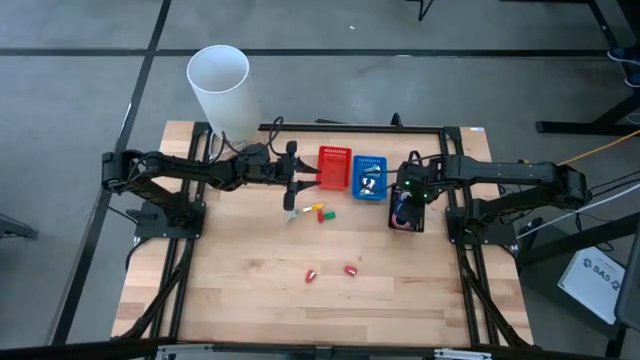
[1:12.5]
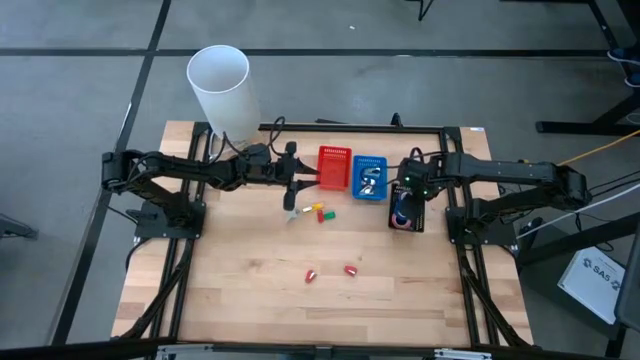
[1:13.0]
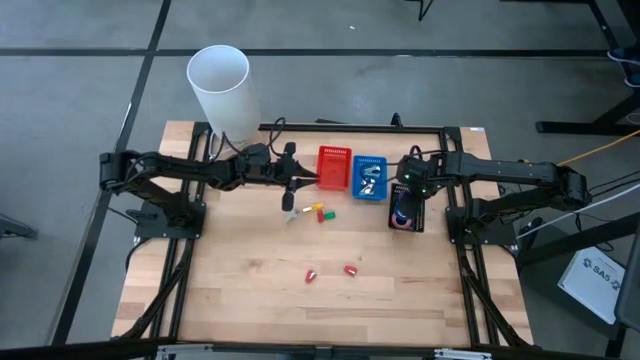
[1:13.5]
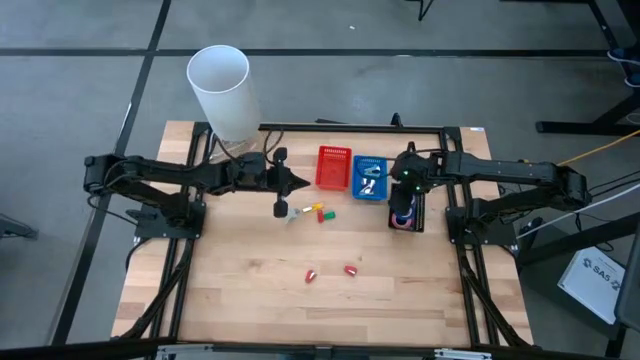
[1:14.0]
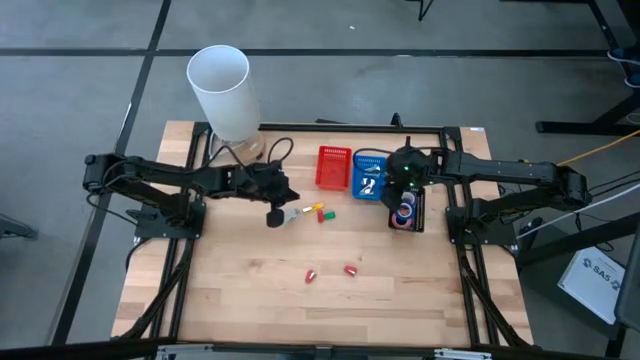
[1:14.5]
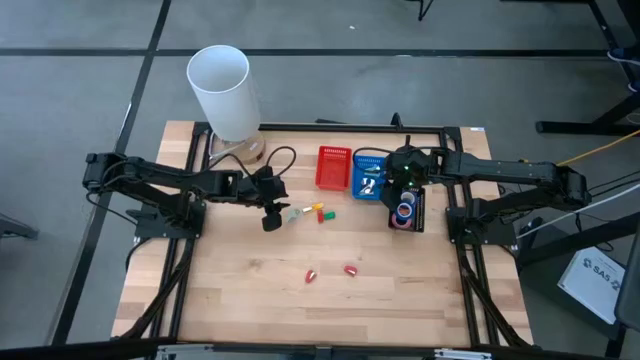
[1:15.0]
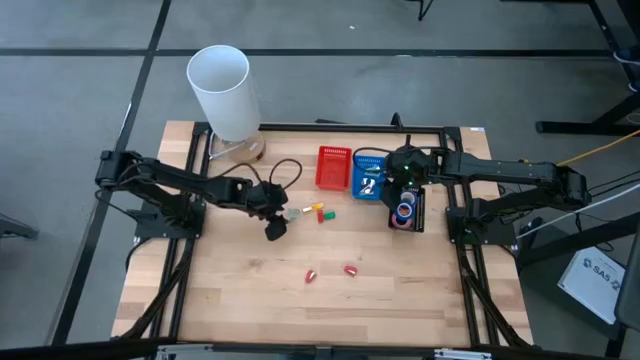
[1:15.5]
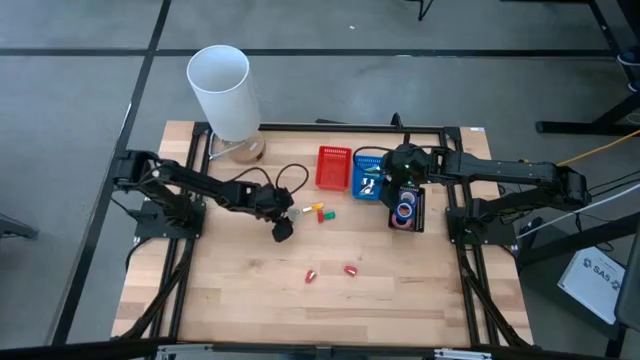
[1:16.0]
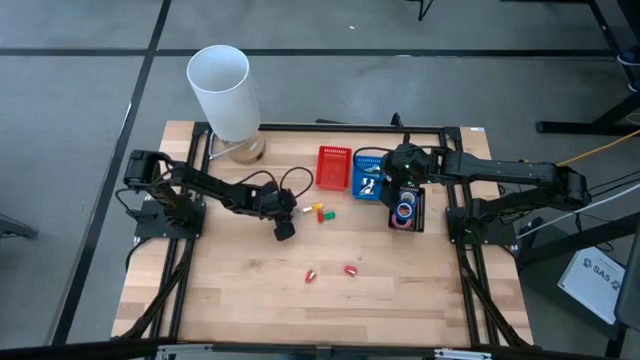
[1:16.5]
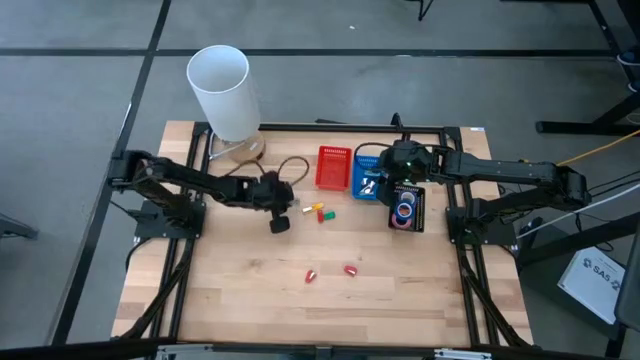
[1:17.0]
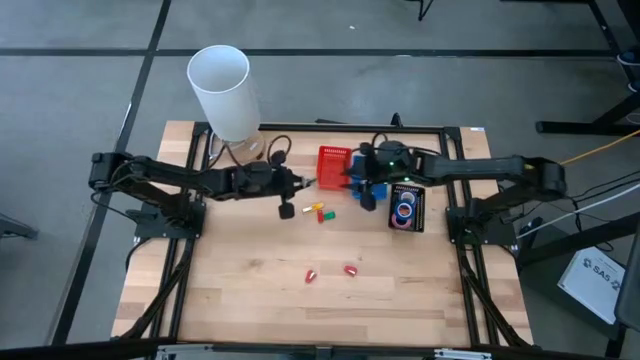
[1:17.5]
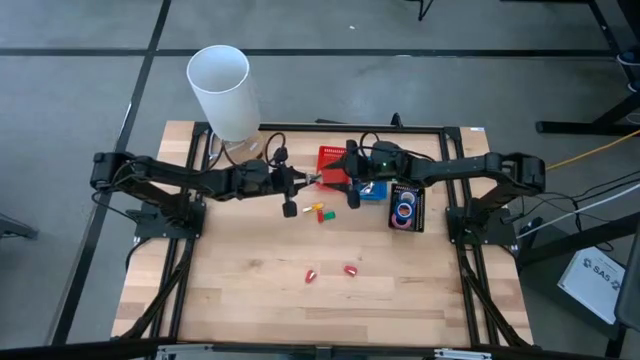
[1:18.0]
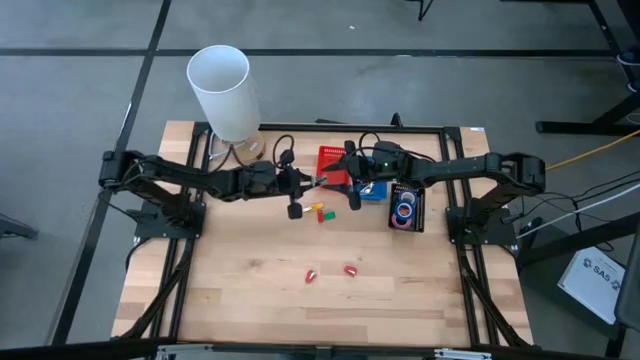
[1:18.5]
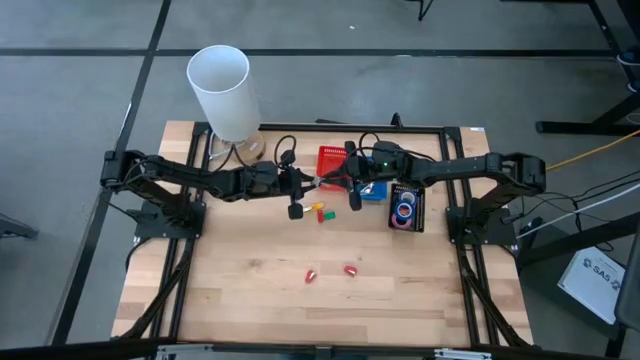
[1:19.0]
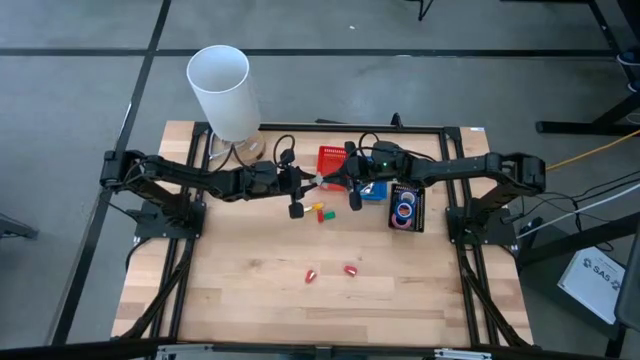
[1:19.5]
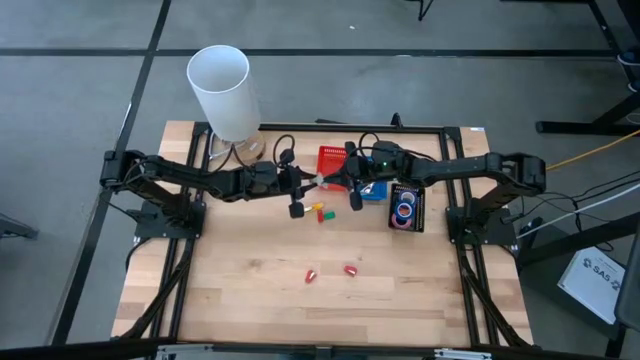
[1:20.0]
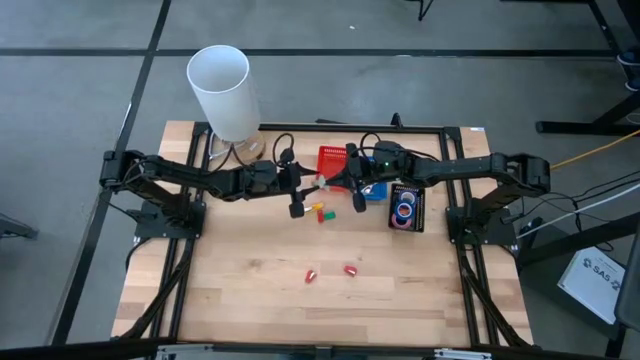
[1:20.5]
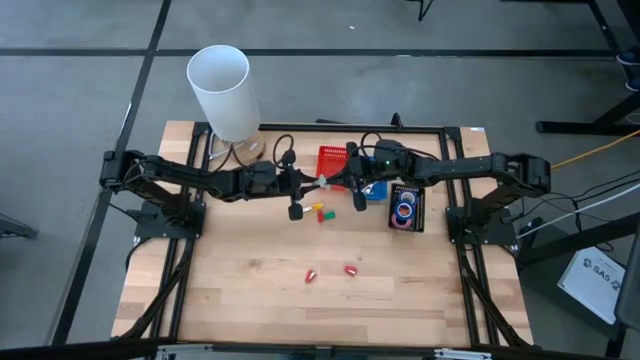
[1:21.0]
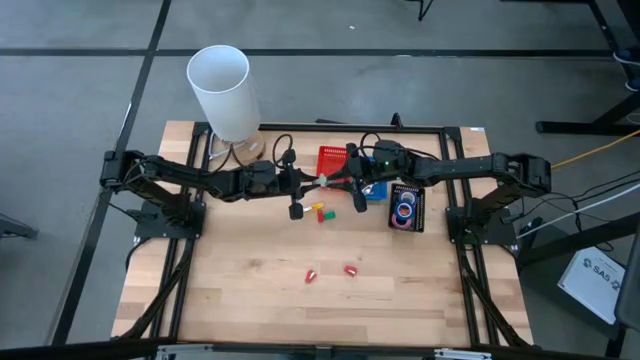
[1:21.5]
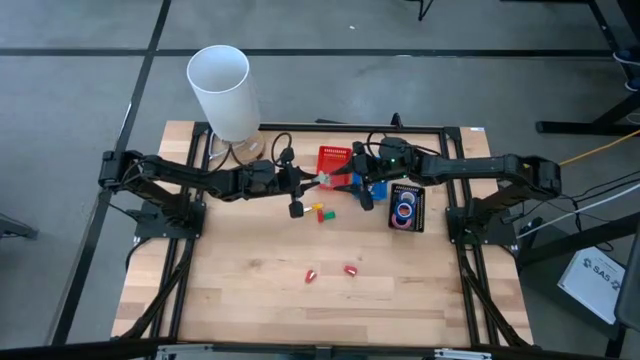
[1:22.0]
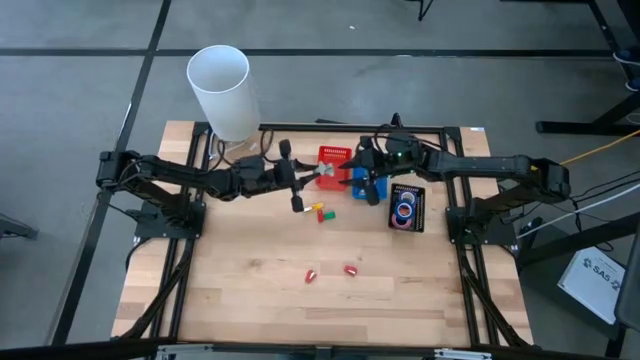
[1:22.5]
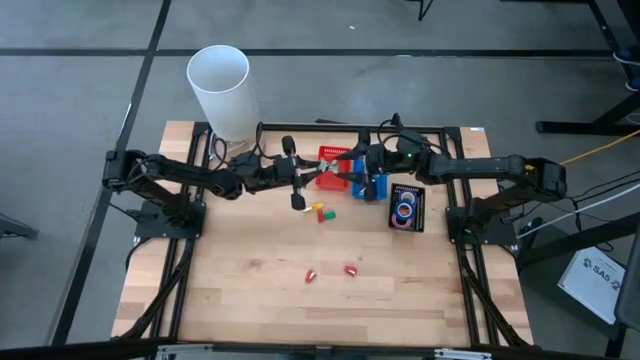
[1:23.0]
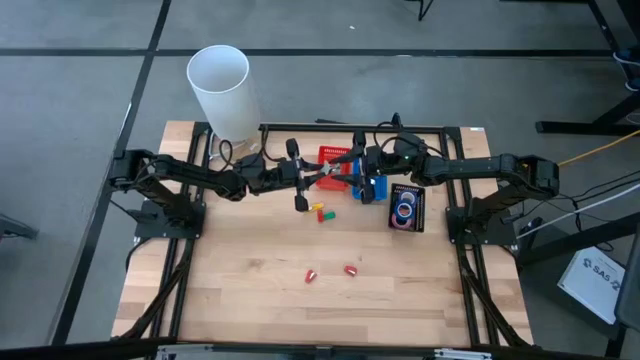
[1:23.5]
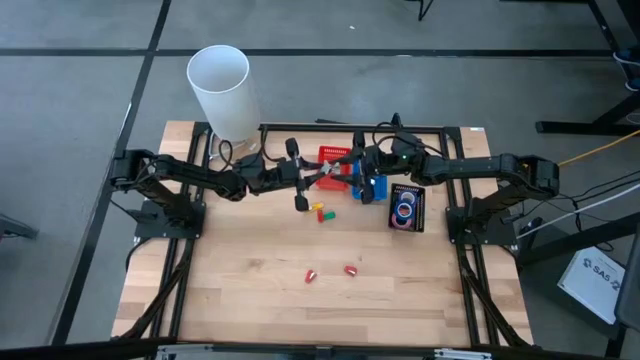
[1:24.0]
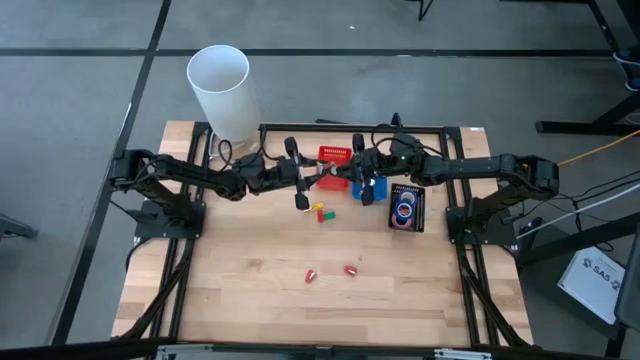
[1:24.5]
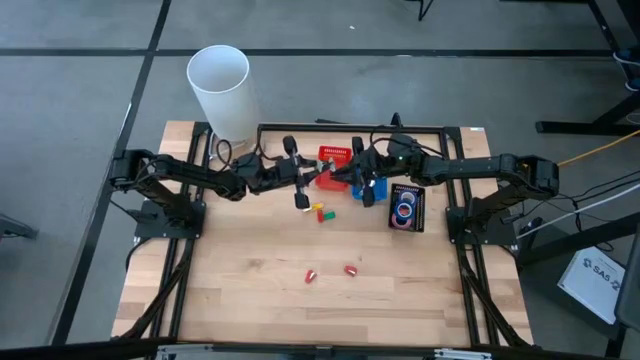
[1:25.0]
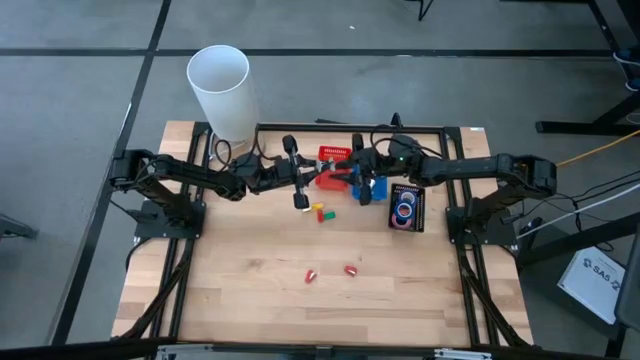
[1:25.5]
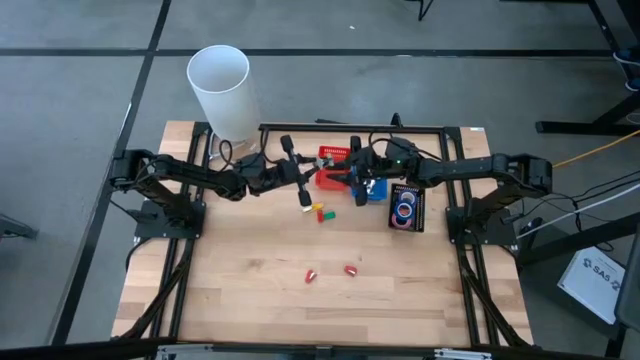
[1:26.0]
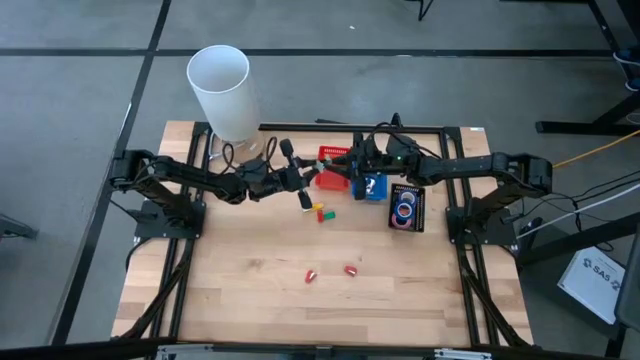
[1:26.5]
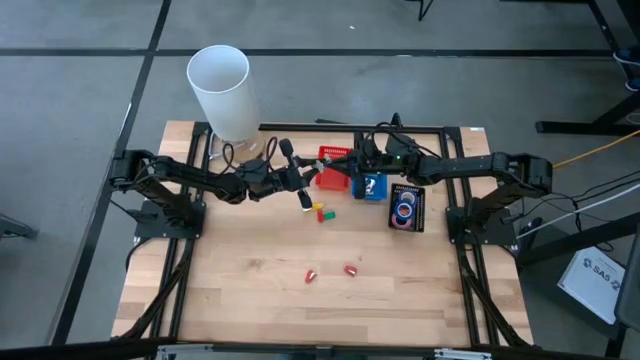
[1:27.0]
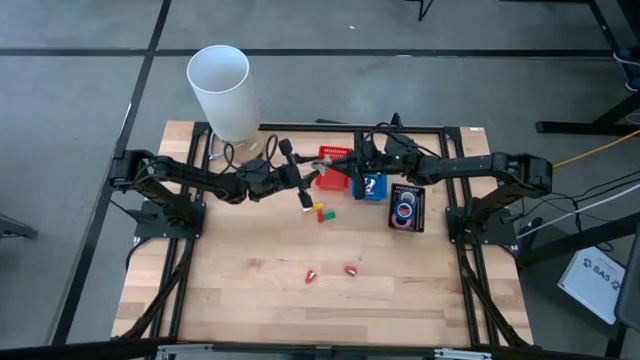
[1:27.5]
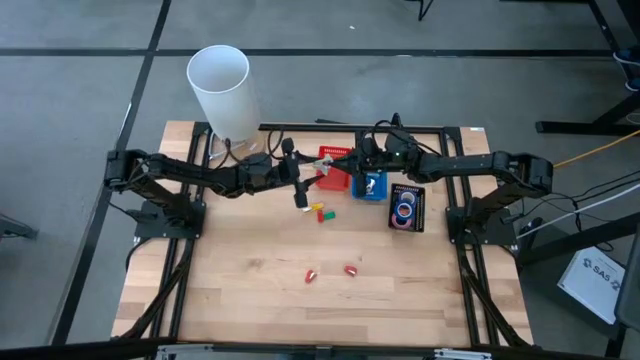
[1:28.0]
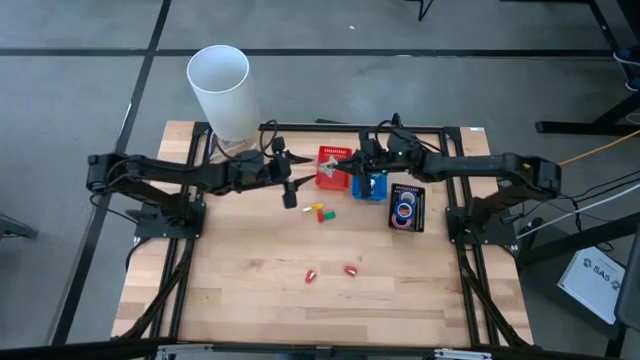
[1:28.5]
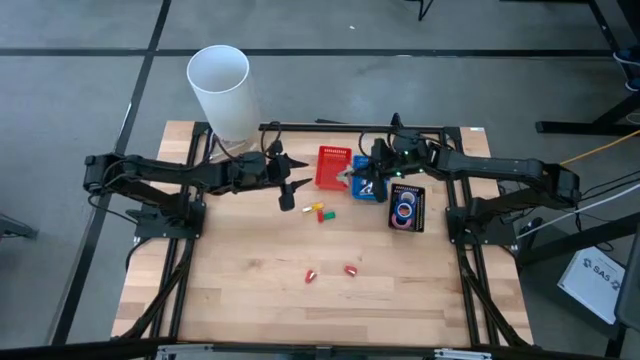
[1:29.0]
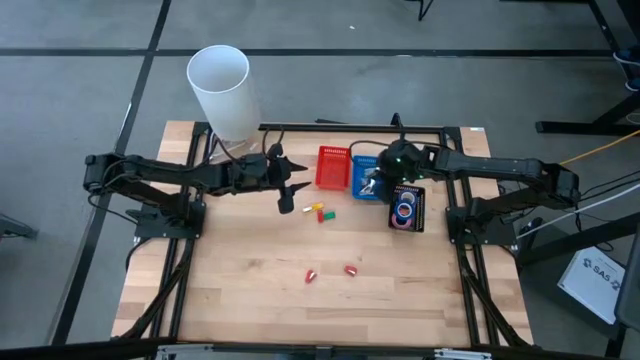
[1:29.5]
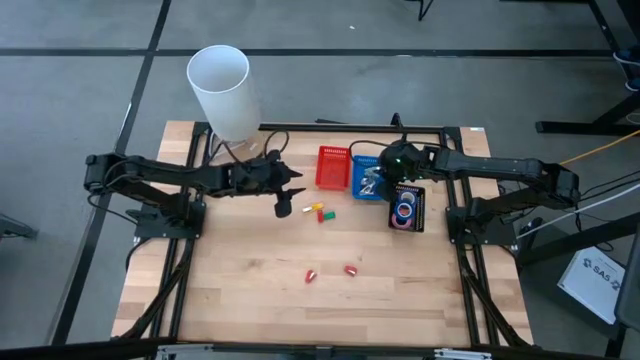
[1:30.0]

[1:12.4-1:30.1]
Task: Pick and place Stapler, Stapler remover, tape
Put the gray staple remover into the blue bin

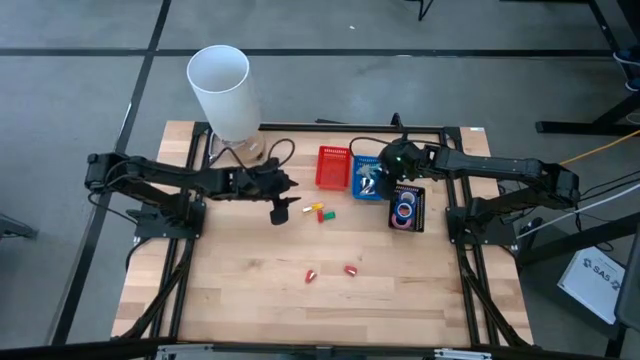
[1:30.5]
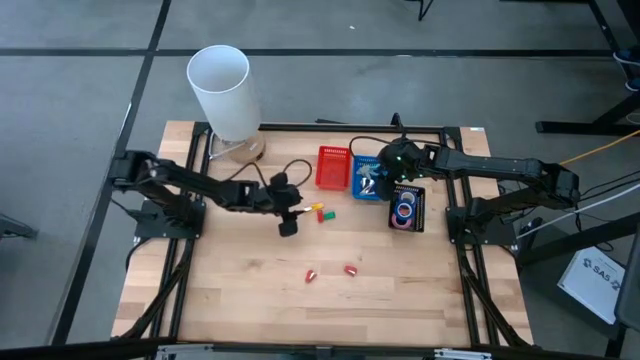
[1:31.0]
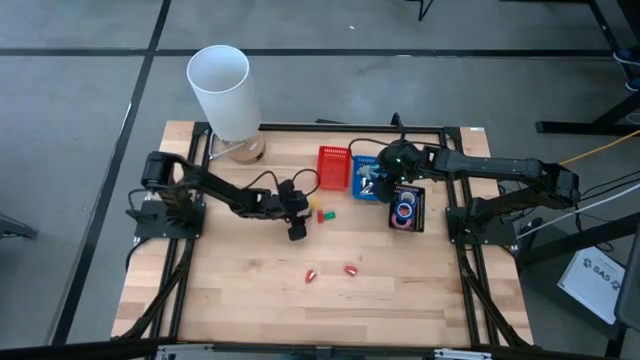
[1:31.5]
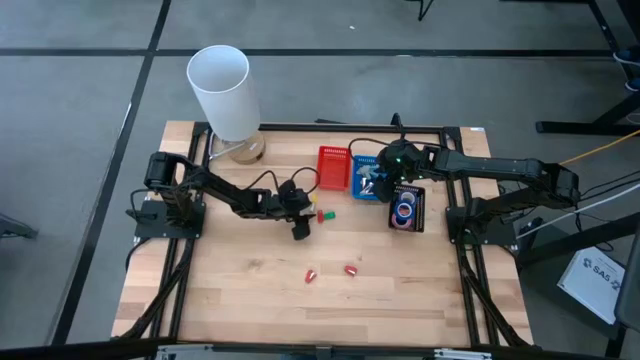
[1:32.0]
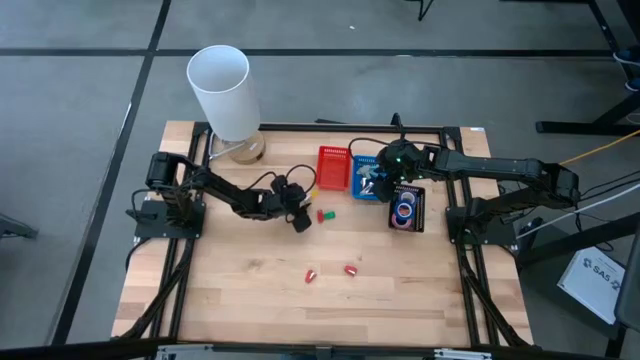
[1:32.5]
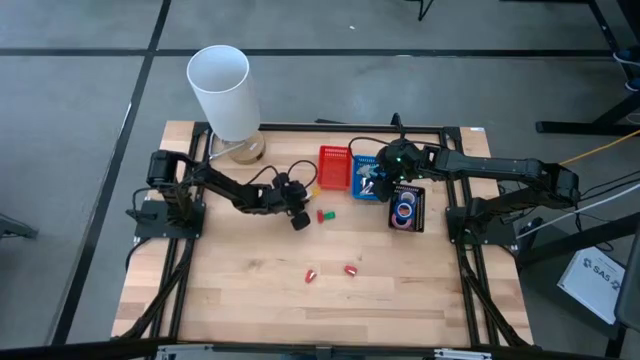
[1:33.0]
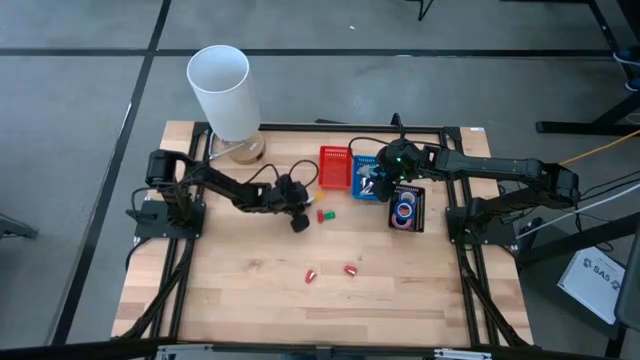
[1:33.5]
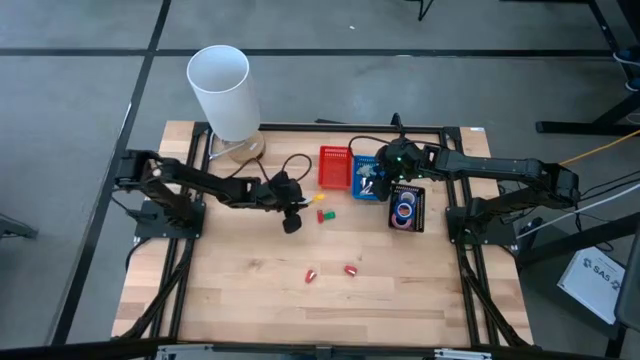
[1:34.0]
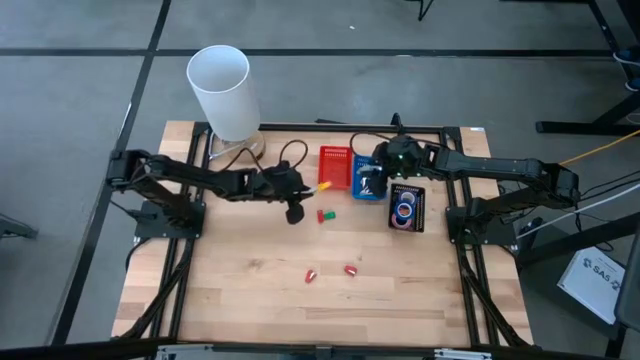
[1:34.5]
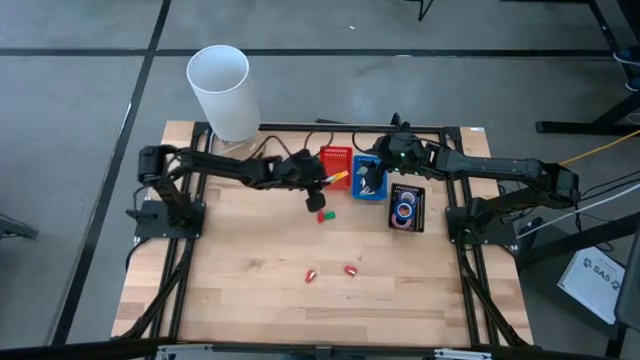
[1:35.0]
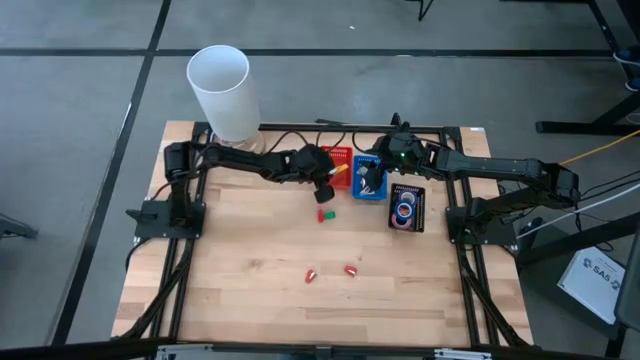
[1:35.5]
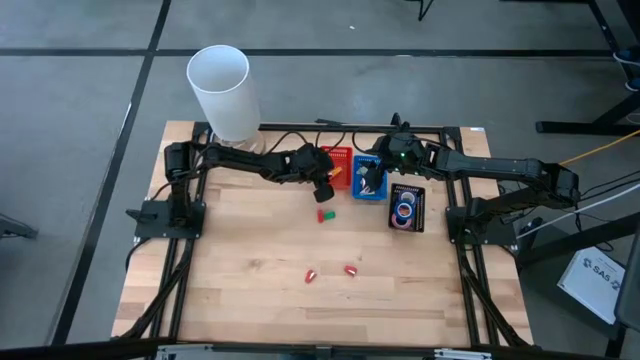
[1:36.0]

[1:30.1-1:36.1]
Put the yellow mini-stapler into the red bin
